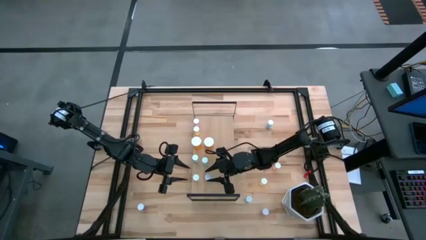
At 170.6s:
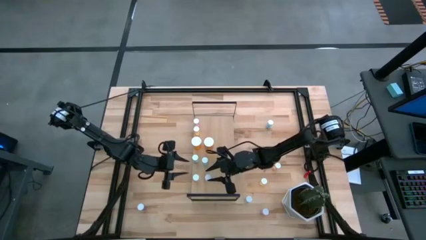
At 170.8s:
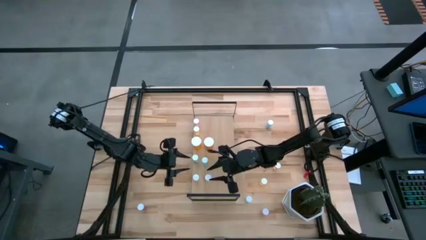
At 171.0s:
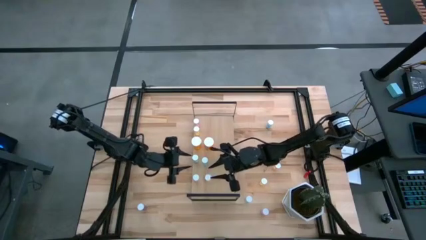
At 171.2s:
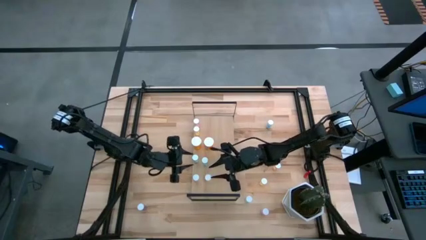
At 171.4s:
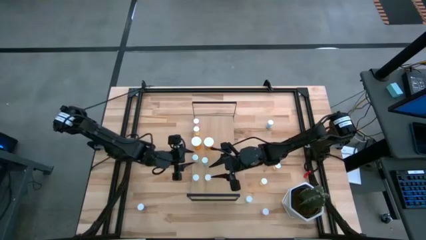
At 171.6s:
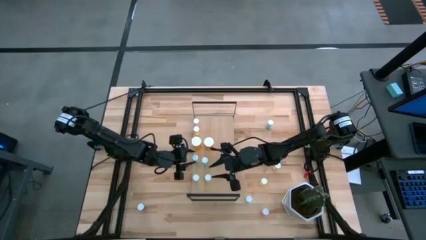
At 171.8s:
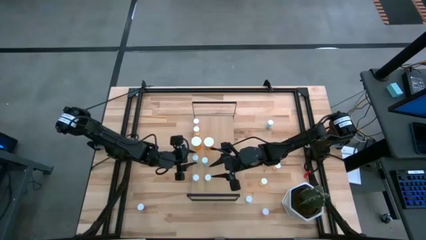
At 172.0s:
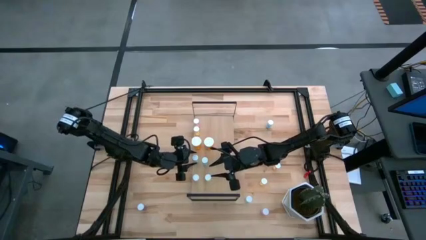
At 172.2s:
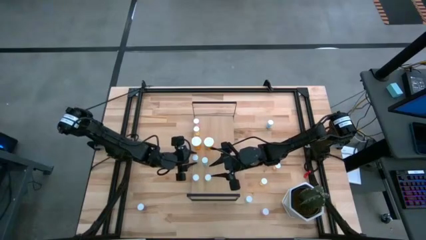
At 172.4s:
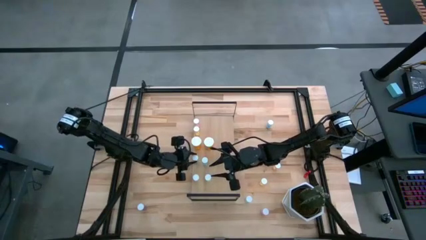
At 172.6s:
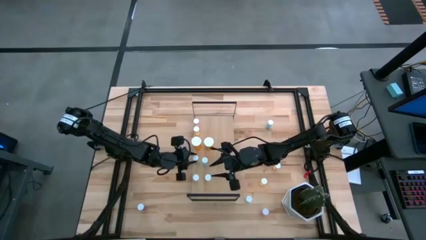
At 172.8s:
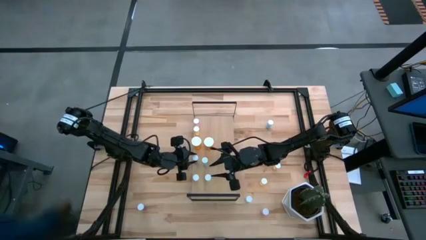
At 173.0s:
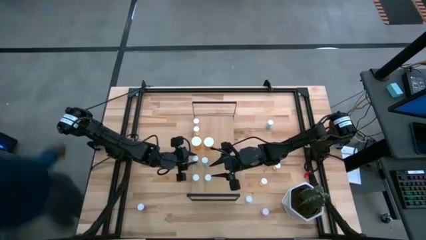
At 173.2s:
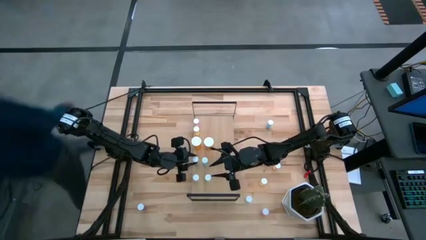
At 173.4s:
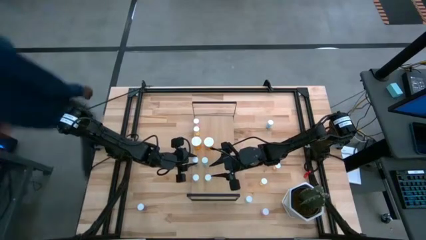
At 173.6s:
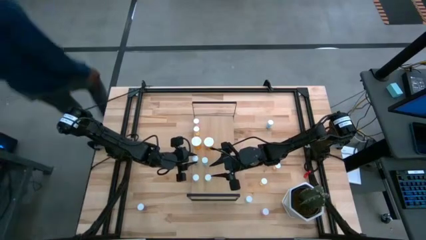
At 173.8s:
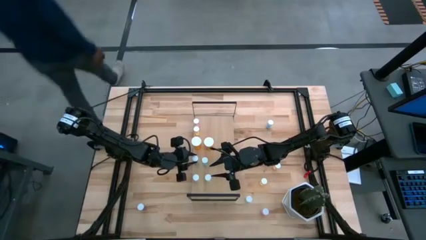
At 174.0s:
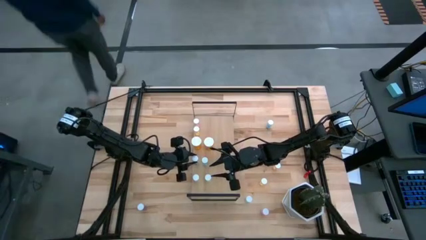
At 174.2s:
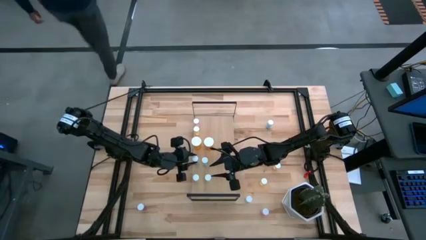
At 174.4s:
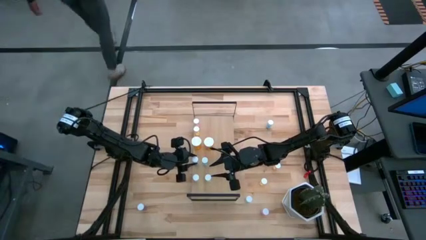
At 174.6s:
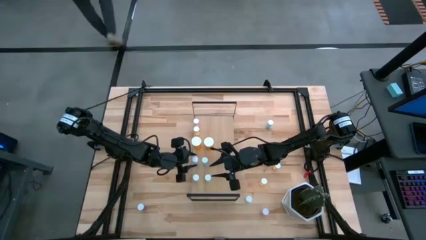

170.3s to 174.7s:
Task: Pick and place medicine bottles onto shelf by color
Adjust the green pill bottle on the shelf

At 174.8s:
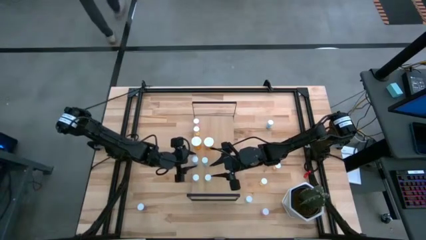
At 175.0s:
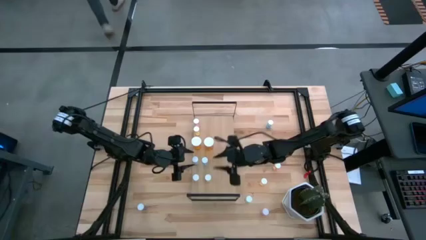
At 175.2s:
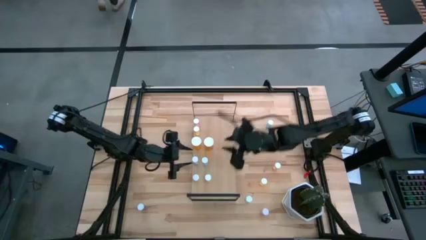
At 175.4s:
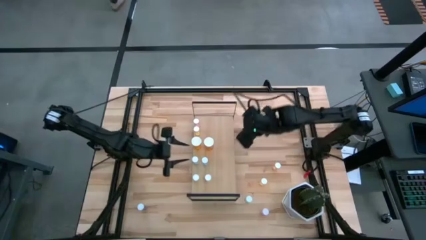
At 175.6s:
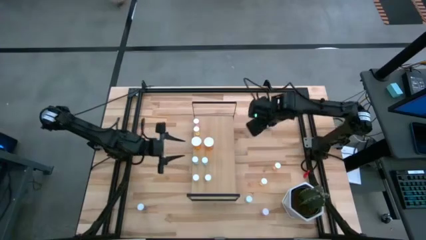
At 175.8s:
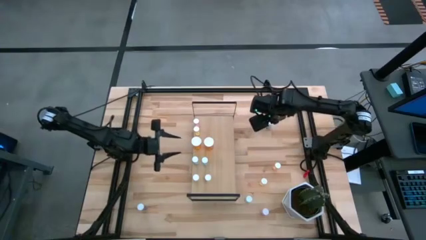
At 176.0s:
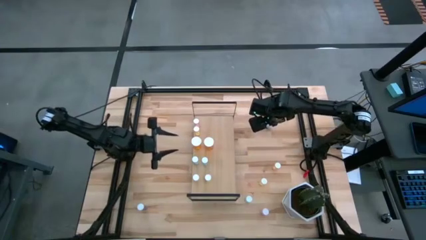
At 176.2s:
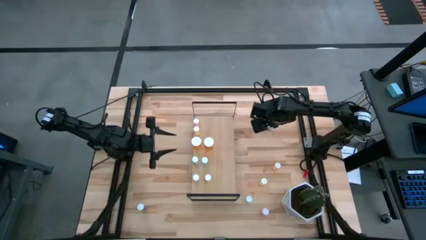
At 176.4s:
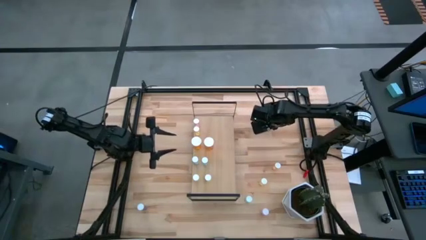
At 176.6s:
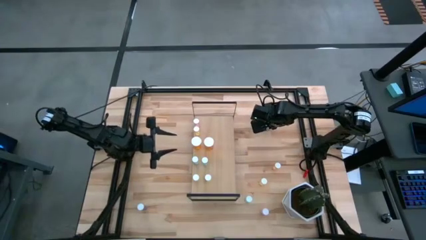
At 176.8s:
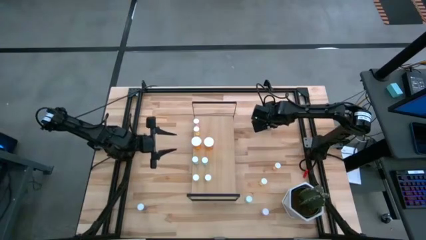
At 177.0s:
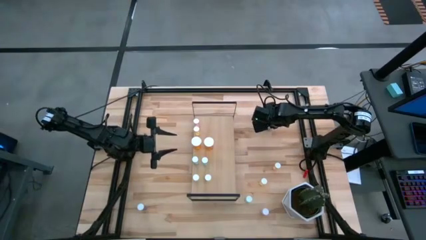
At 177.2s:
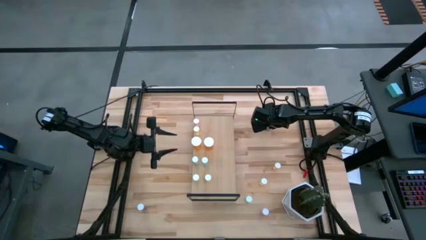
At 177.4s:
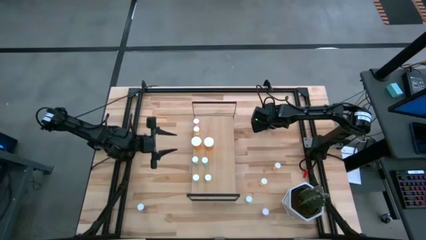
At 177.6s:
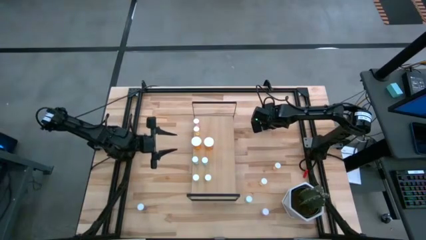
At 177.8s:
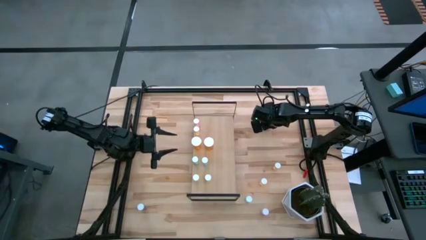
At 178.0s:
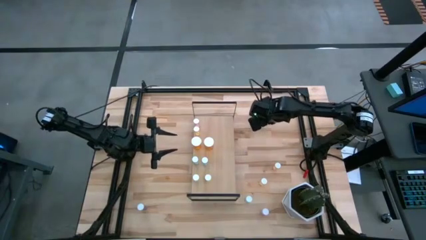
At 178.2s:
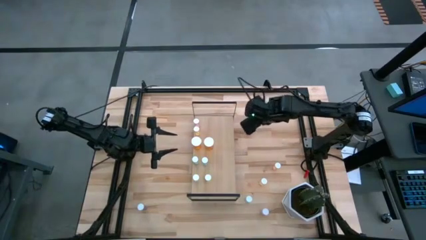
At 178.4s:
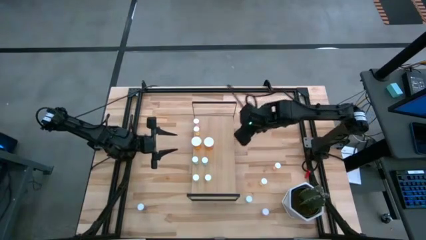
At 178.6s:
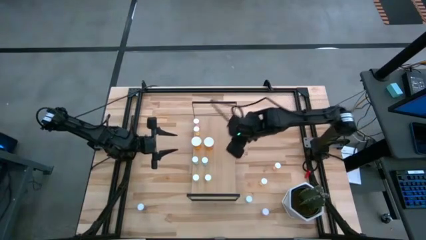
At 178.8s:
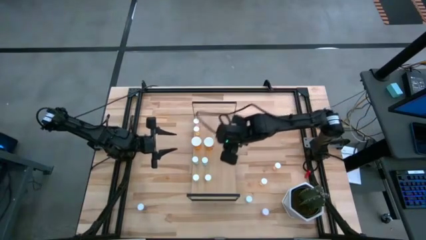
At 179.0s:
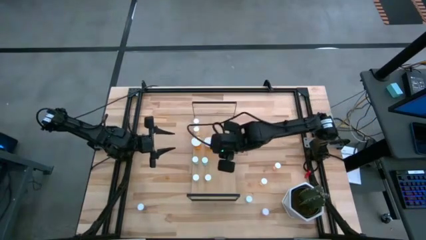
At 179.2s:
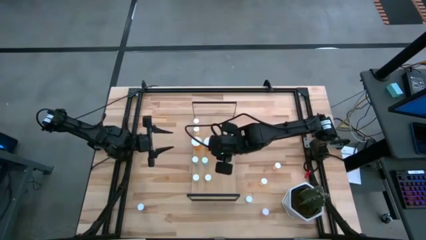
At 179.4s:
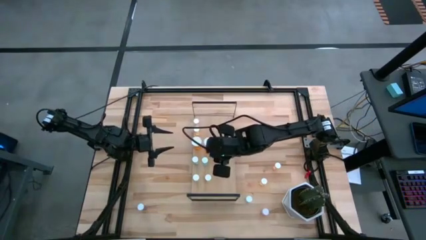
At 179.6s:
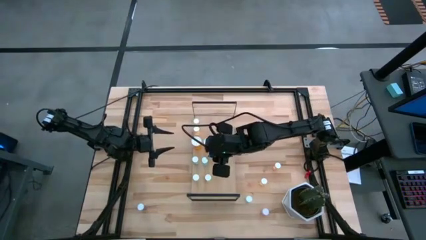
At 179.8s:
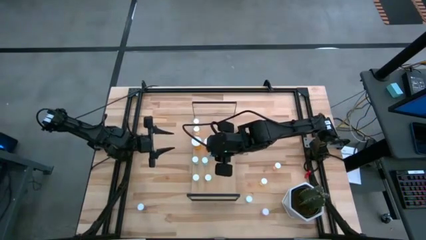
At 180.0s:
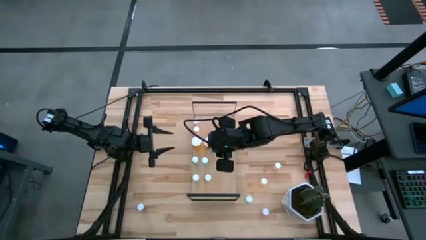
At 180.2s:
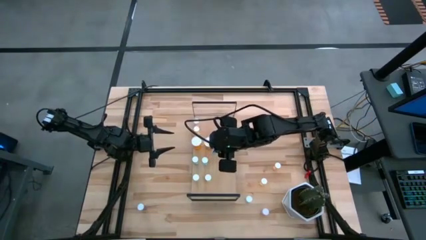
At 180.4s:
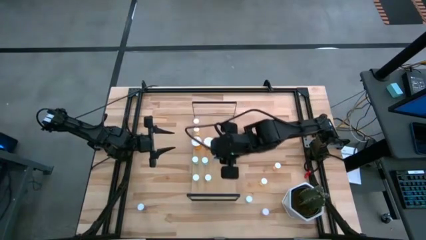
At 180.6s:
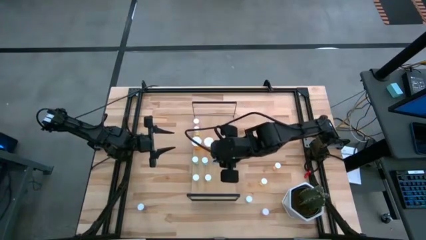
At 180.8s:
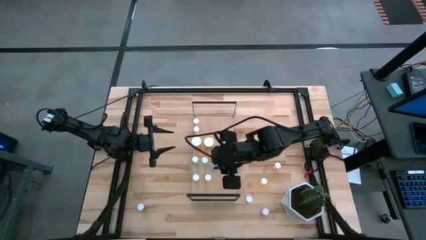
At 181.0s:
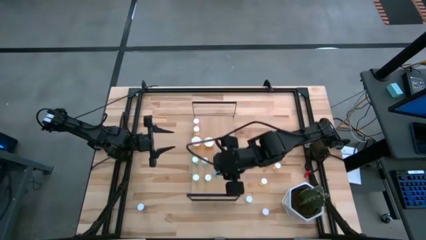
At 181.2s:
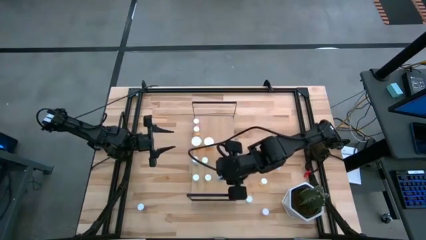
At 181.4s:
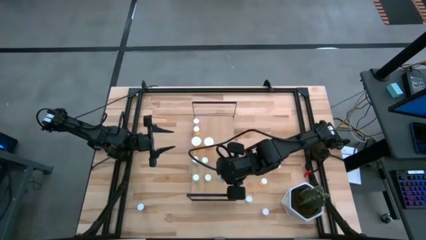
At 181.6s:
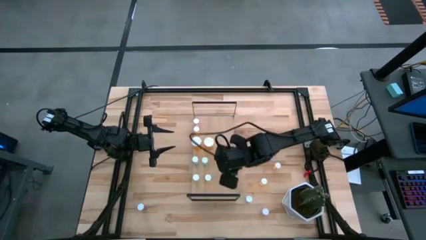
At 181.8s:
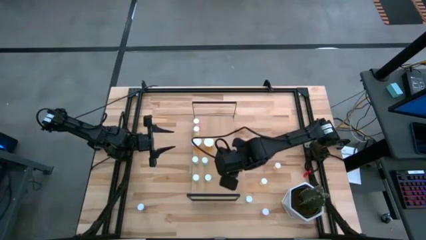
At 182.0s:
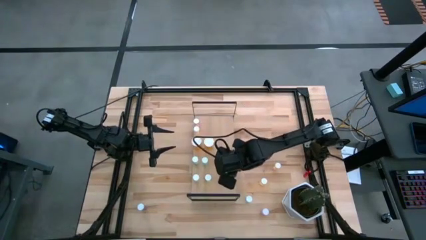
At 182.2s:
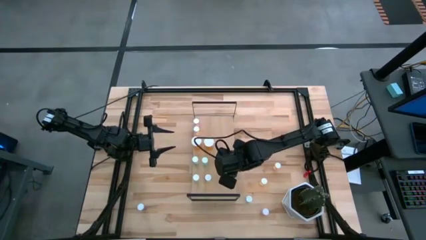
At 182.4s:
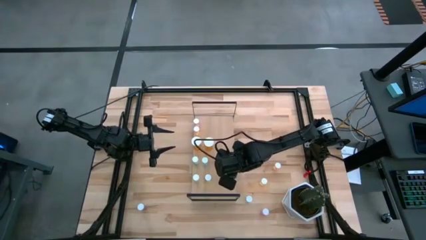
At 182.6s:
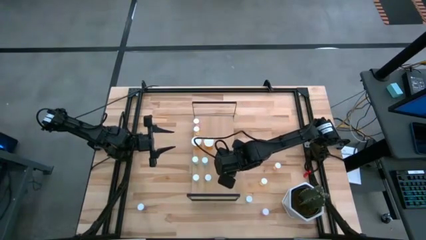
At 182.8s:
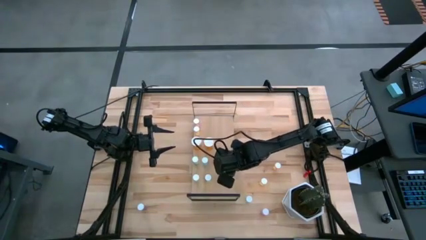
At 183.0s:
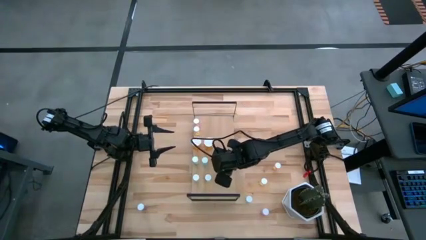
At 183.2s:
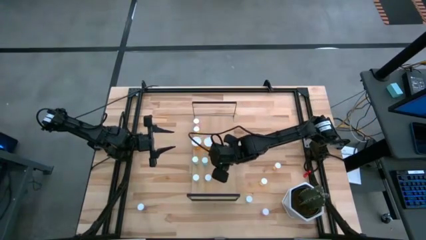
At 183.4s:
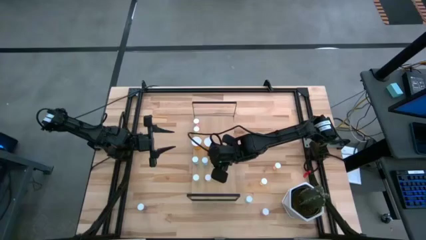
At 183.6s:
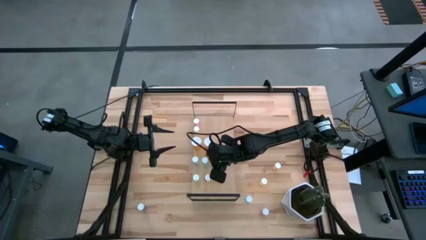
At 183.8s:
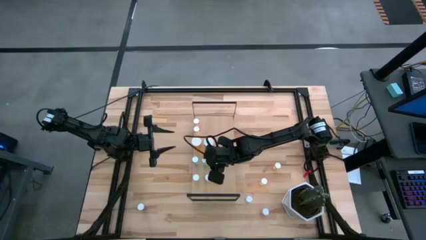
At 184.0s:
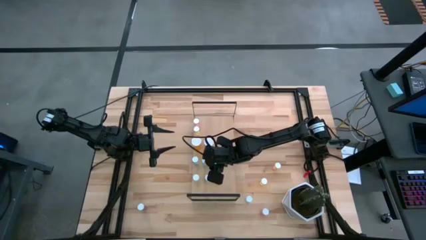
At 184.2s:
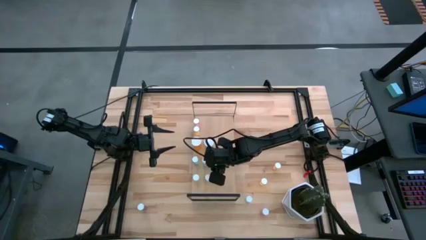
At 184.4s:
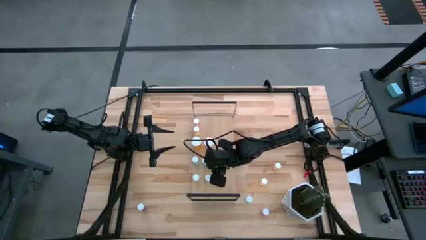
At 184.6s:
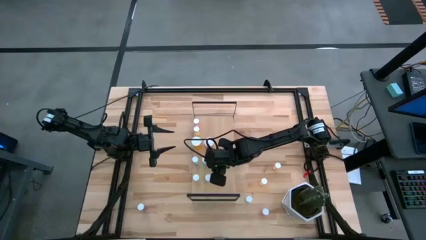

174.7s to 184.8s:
Put the blue pill bottle on the shelf

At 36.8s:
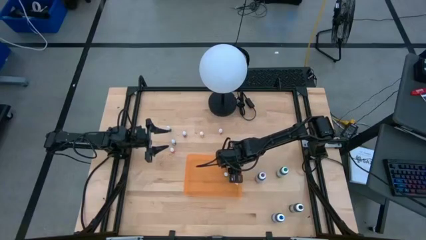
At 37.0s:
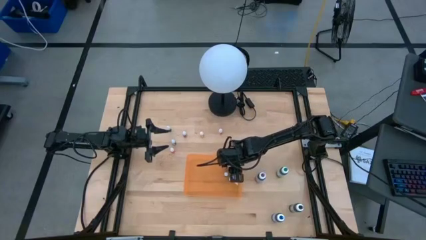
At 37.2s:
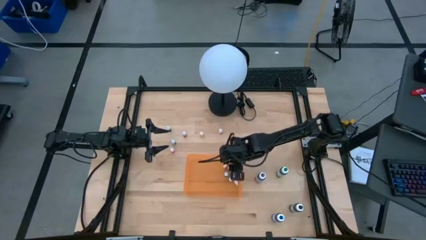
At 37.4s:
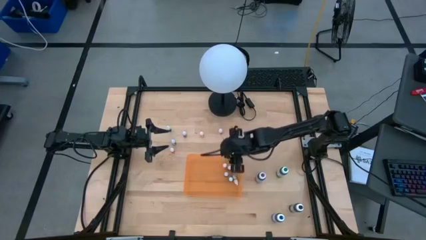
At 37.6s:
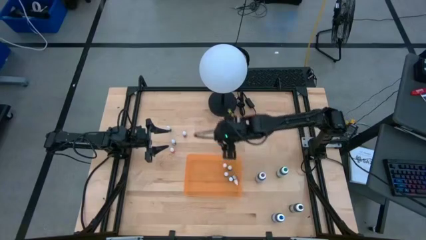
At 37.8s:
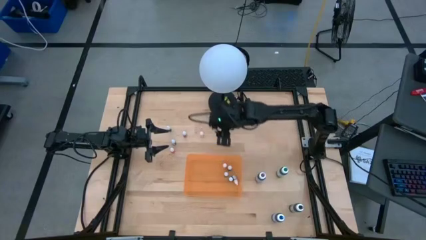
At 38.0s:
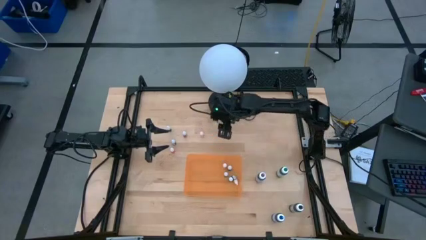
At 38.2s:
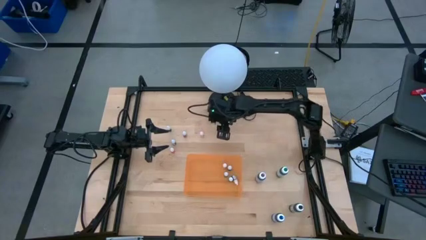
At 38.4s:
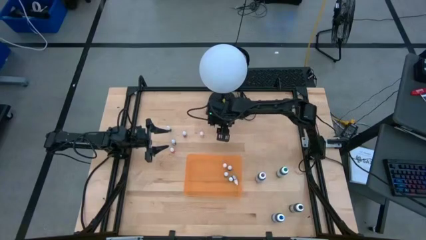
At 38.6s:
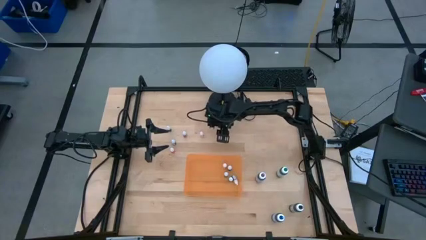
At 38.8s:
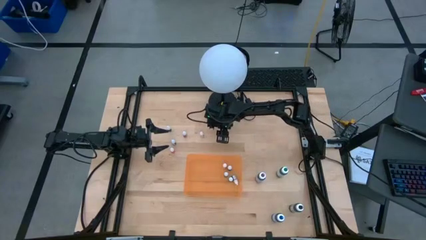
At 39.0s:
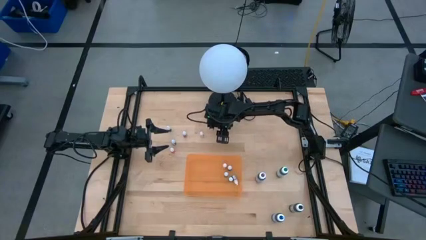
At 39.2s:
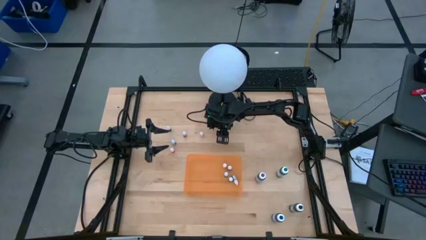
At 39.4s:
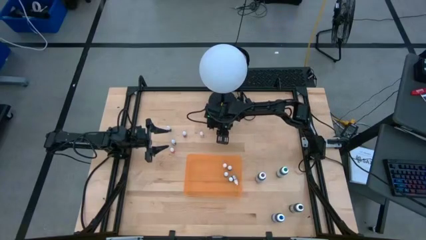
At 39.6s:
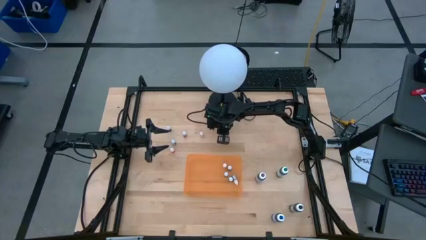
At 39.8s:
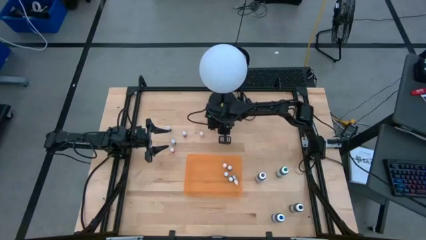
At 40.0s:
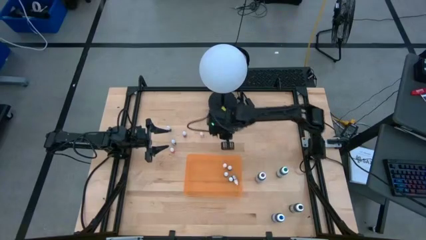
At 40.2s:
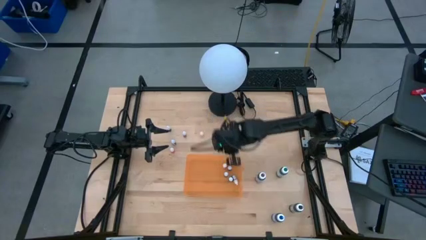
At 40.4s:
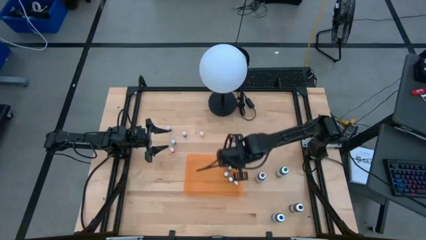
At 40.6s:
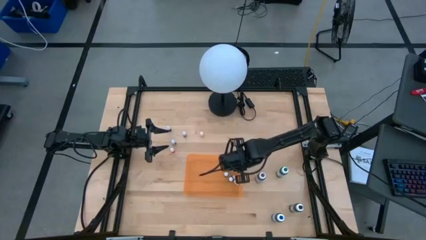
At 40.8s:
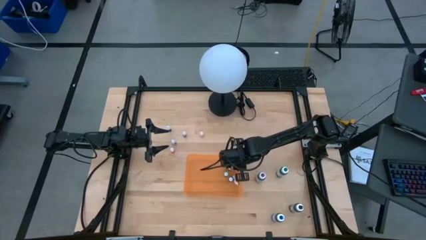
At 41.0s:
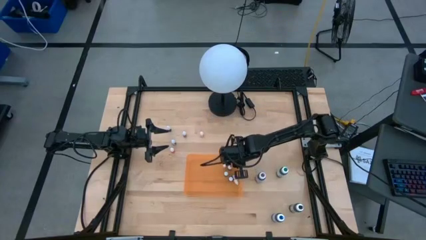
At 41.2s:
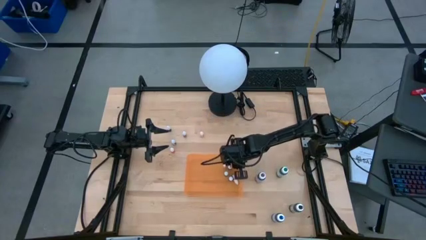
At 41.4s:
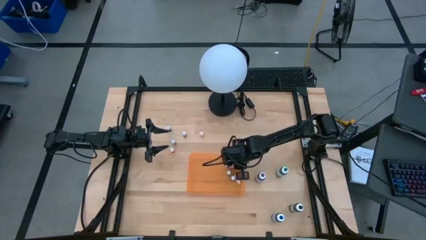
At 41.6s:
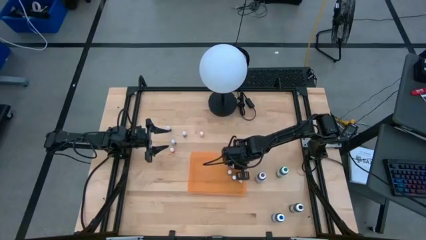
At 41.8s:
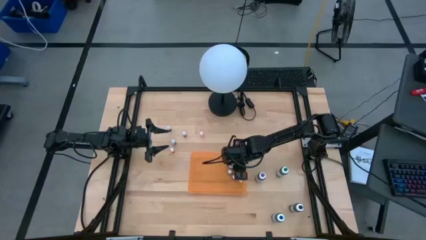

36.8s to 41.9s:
Task: Pick & Place food coloring
Put the small orange food coloring bottle into the orange container
